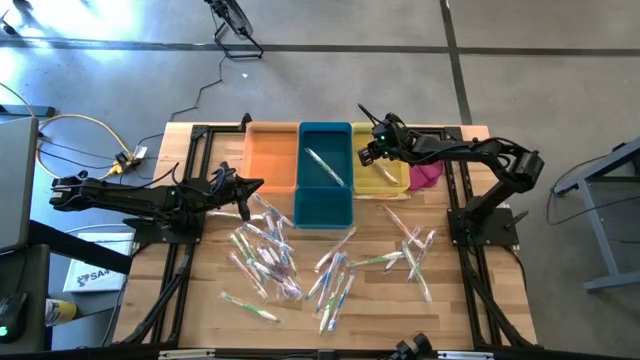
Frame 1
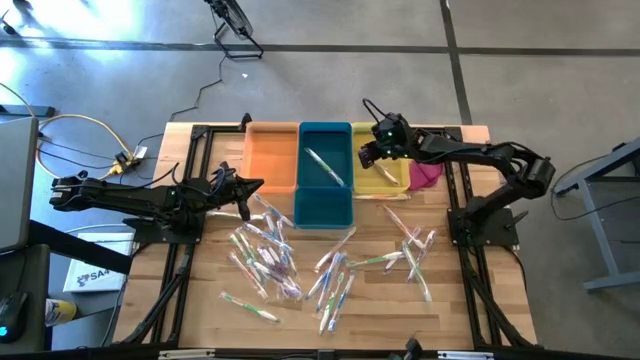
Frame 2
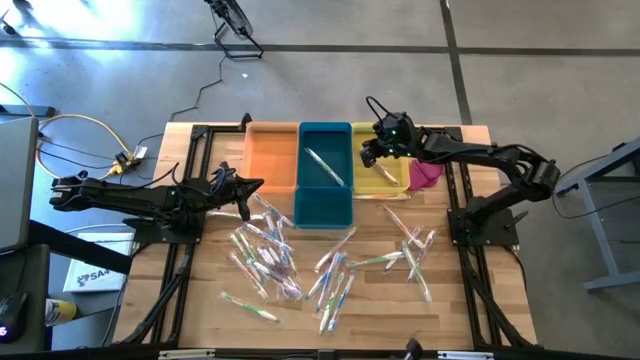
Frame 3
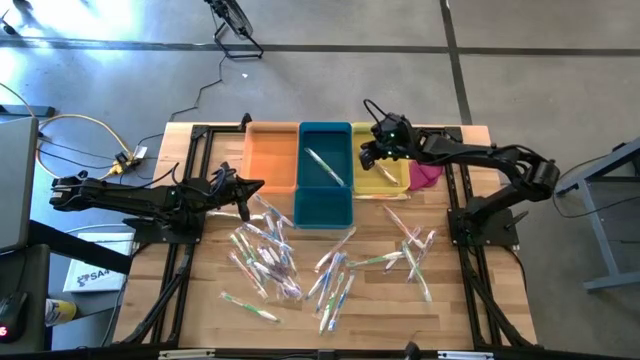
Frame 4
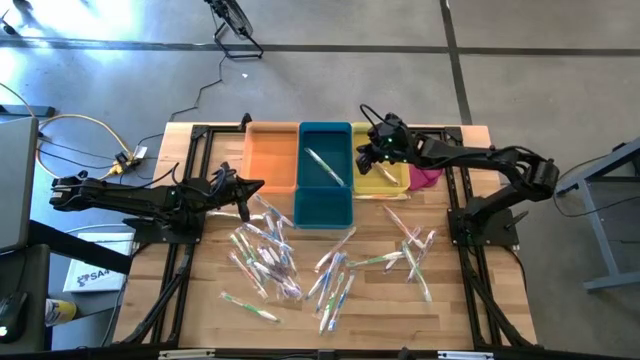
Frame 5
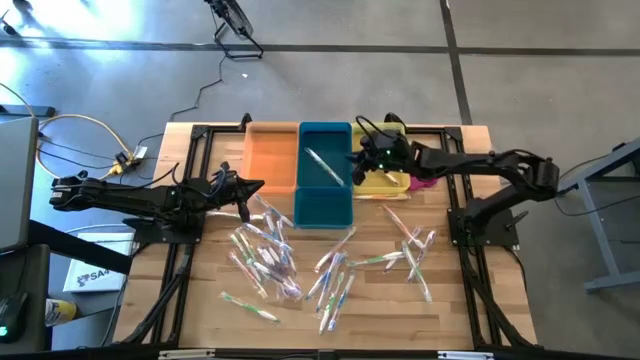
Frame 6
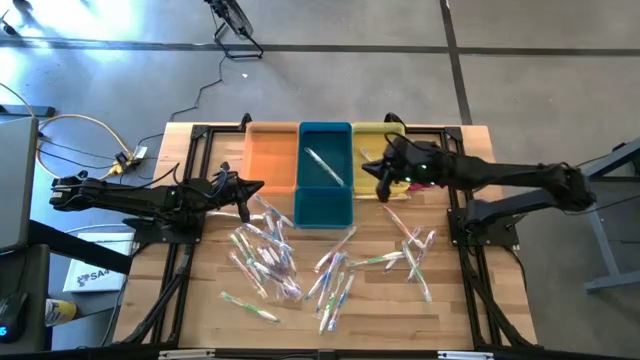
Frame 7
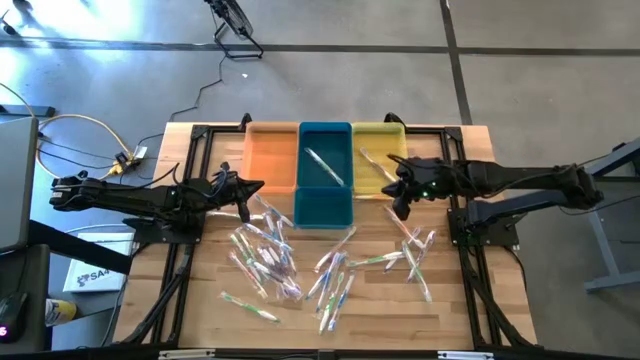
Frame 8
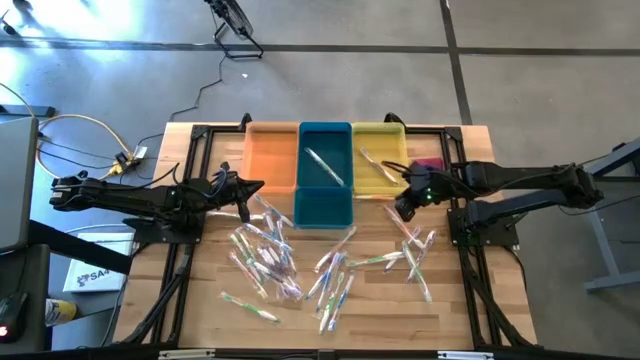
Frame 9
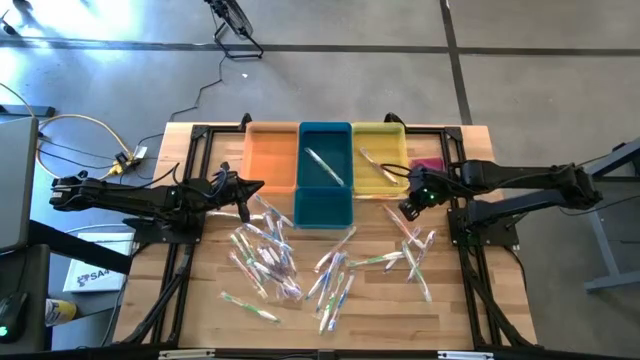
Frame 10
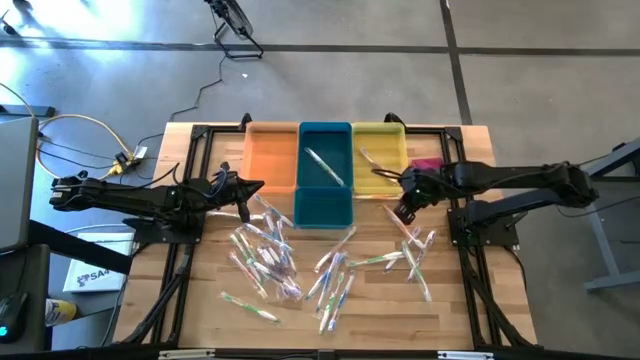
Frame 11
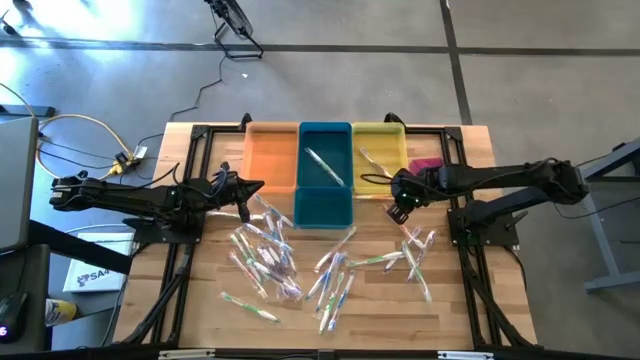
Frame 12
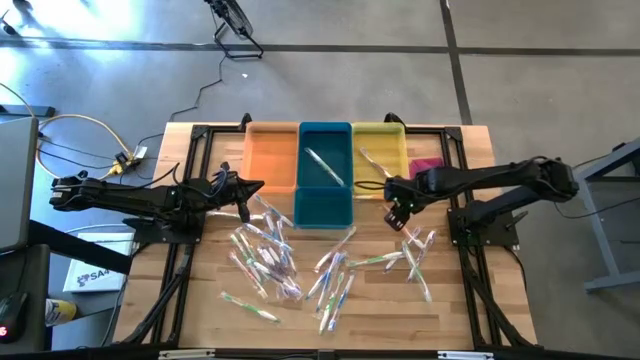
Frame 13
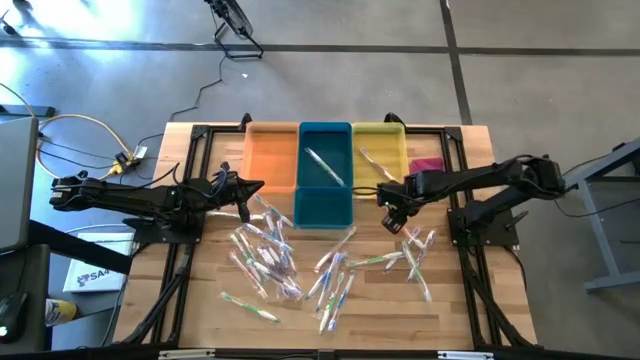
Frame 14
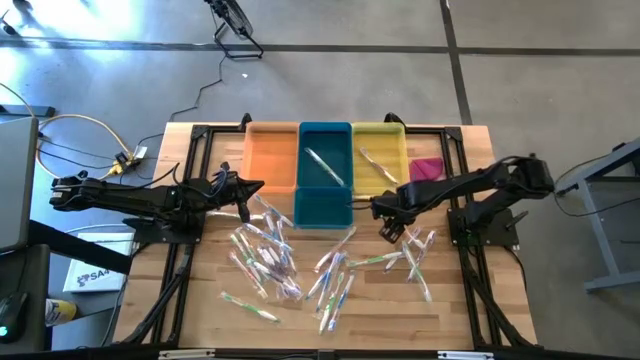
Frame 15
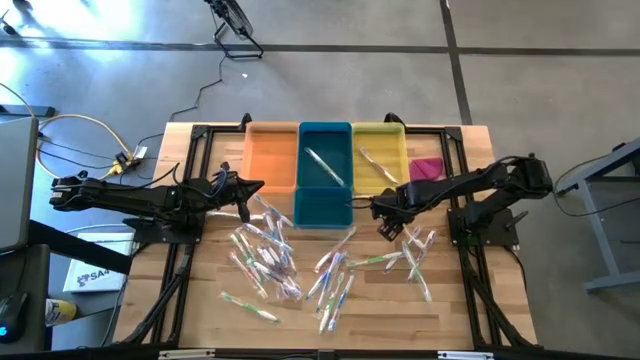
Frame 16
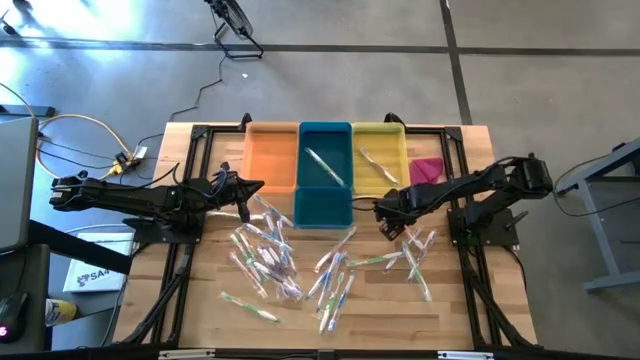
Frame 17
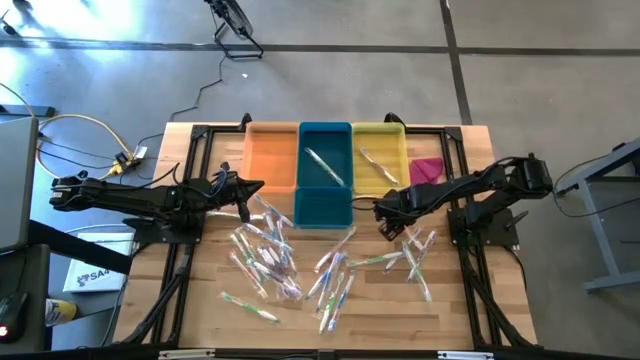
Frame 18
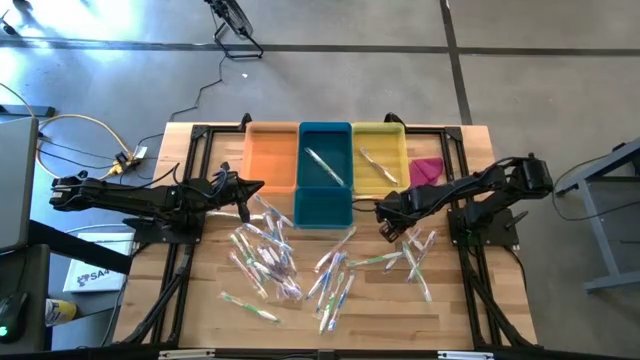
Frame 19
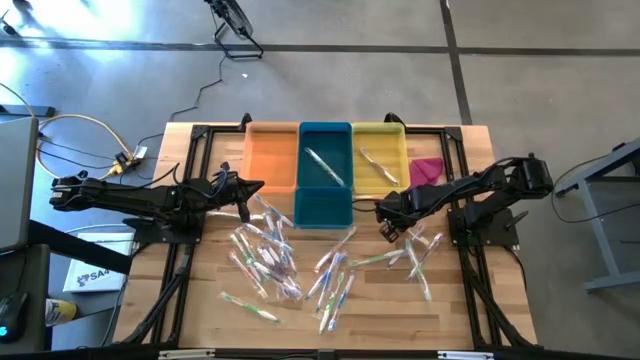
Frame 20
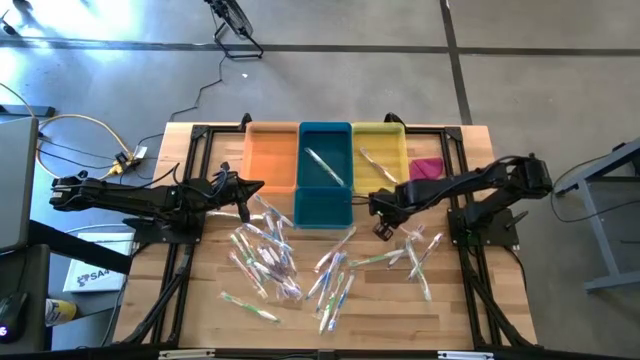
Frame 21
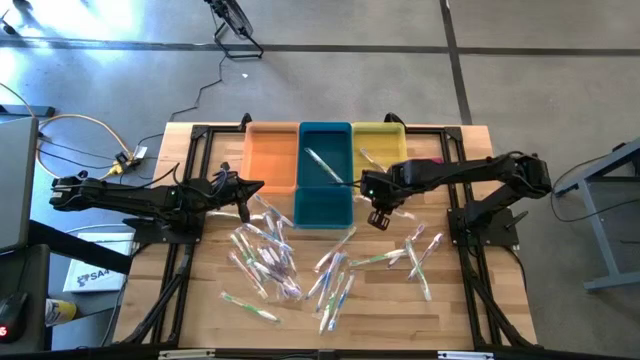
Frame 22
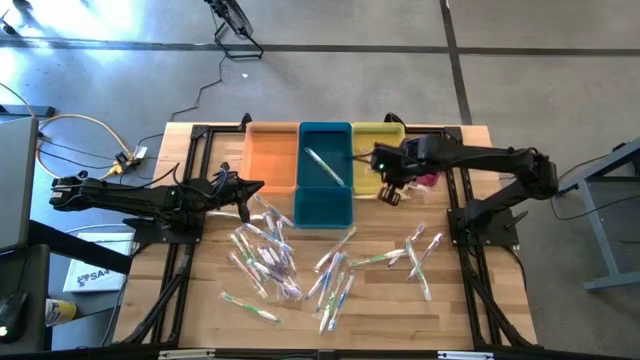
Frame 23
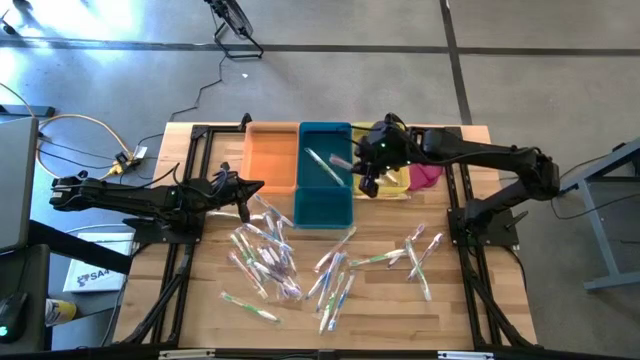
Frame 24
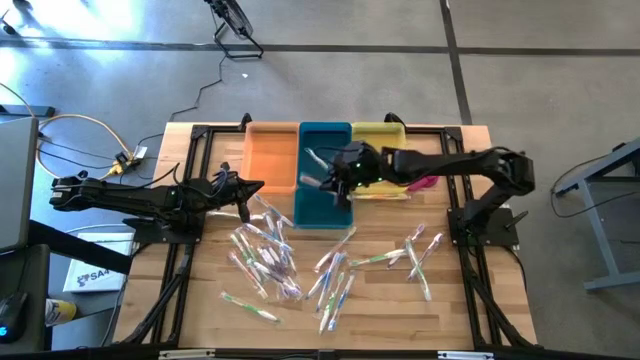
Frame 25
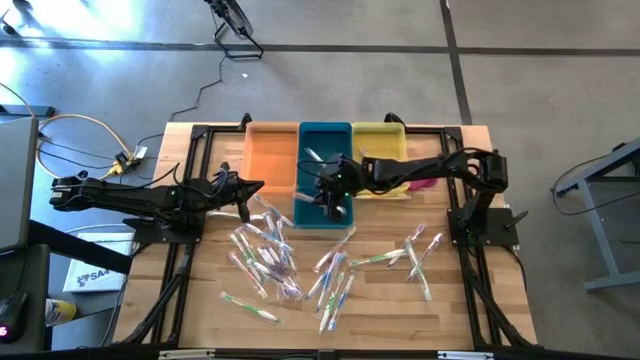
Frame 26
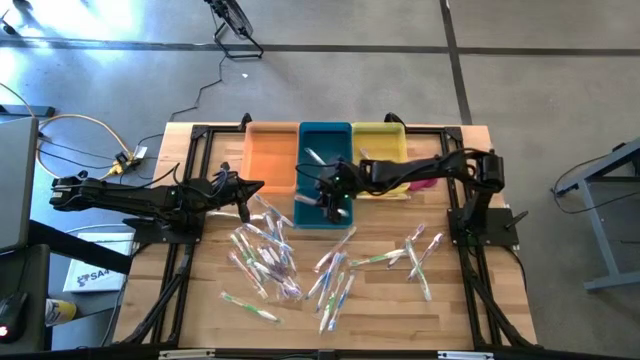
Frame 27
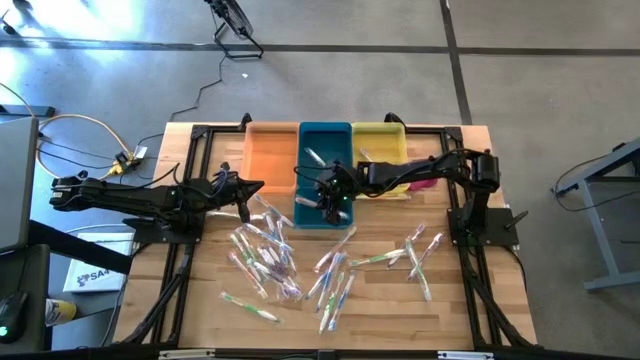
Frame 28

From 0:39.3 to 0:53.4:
Task: Pick & Place Toothbrushes
Put the orange toothbrush into the bottom blue bin

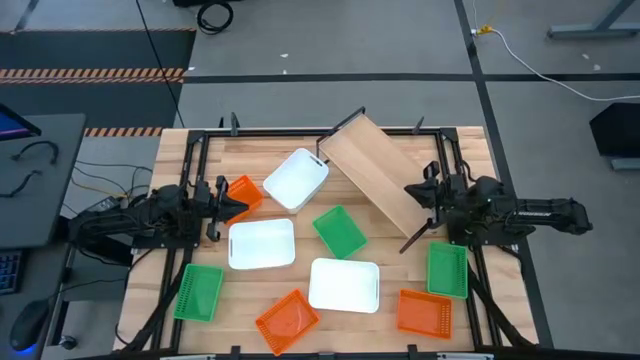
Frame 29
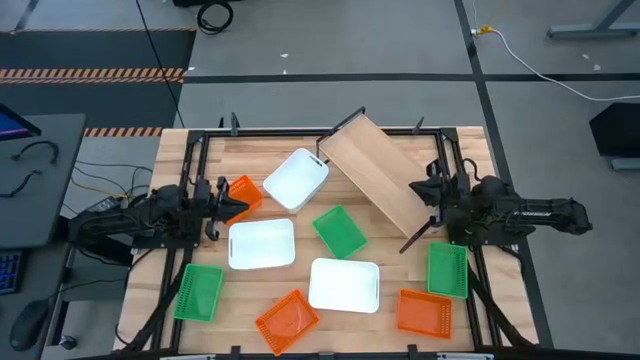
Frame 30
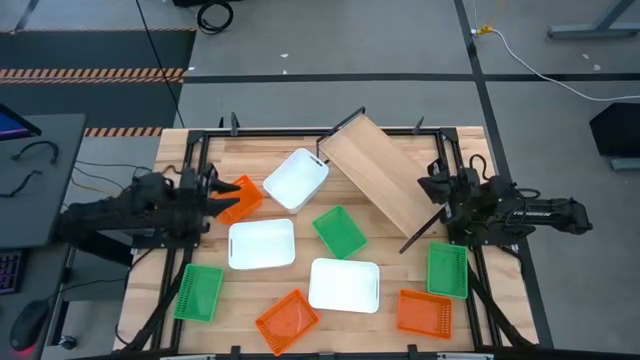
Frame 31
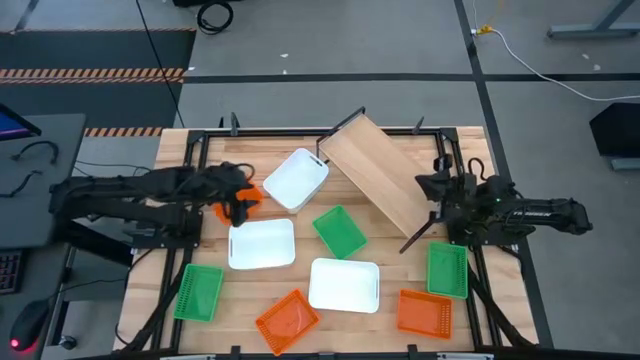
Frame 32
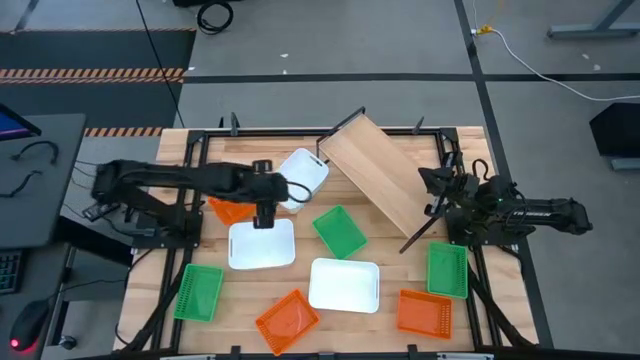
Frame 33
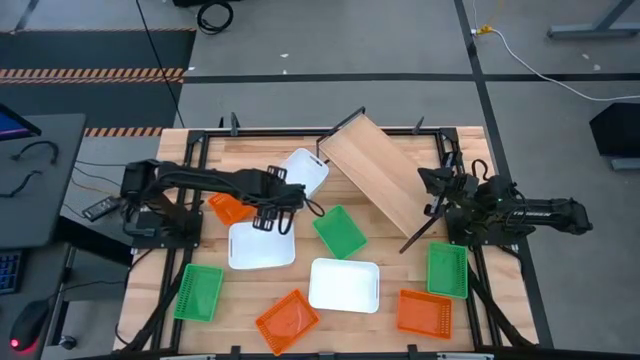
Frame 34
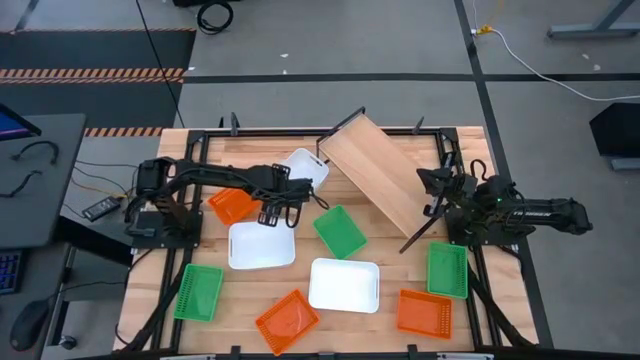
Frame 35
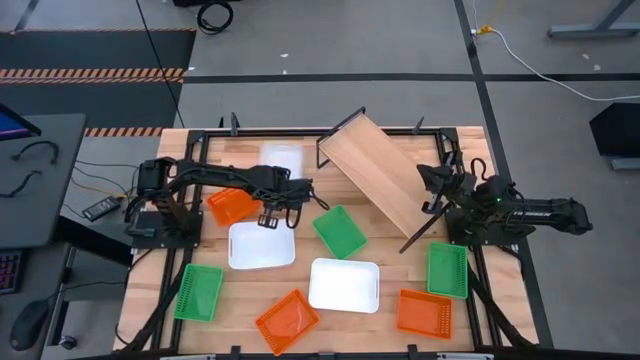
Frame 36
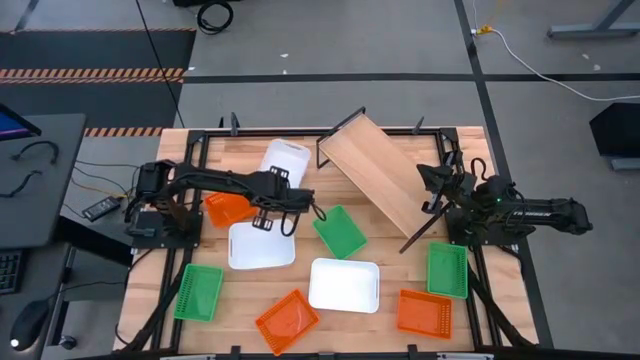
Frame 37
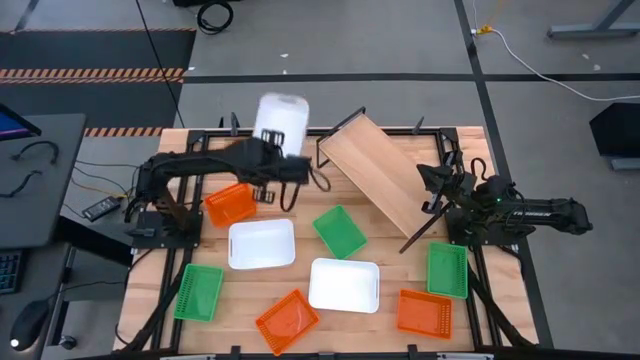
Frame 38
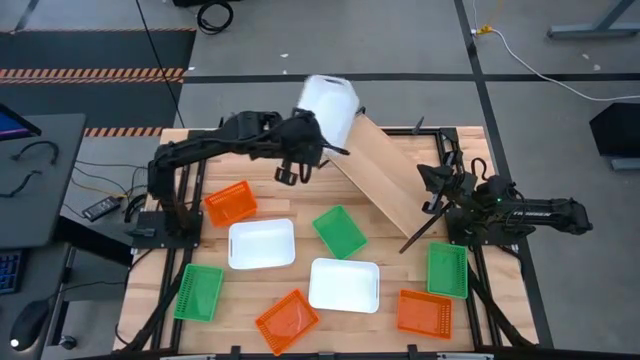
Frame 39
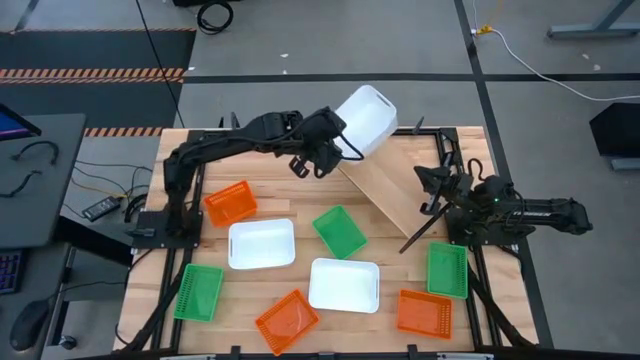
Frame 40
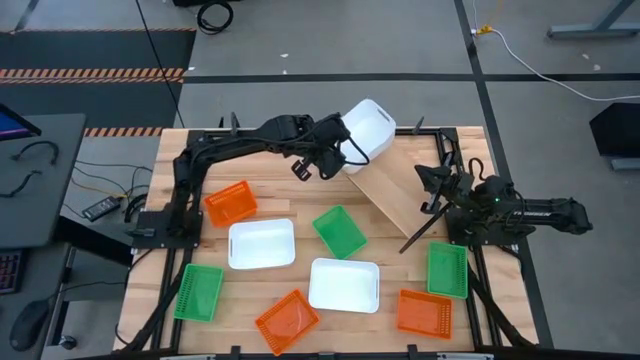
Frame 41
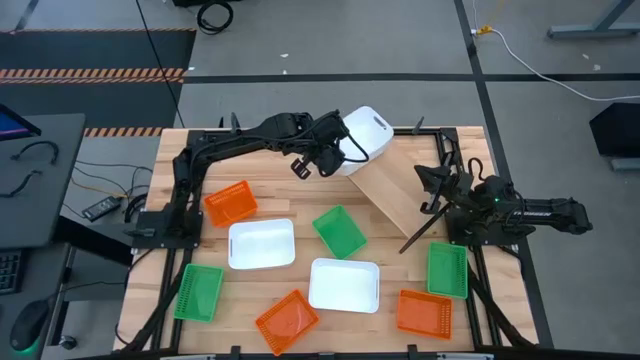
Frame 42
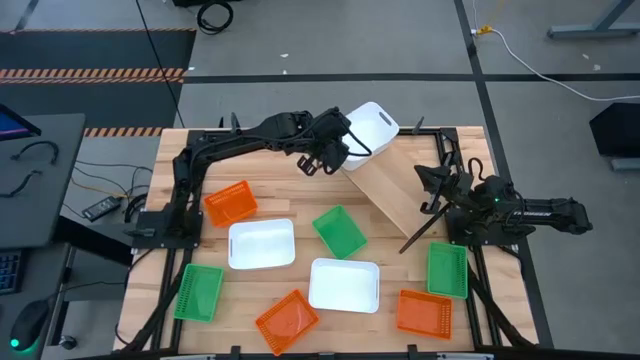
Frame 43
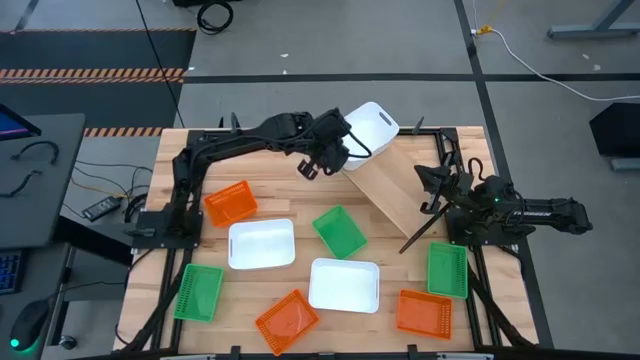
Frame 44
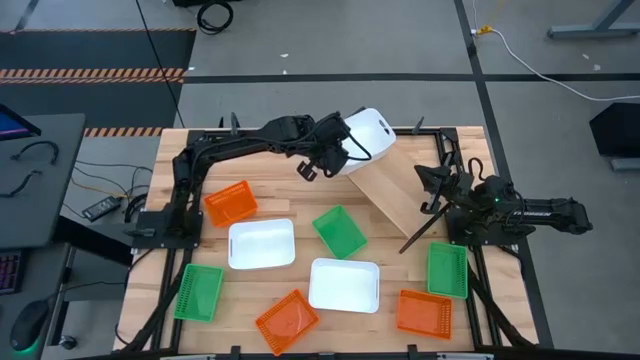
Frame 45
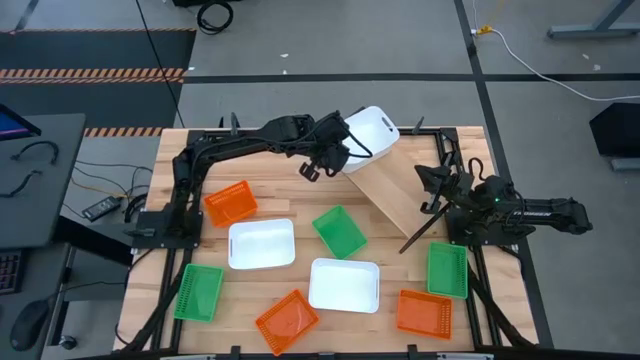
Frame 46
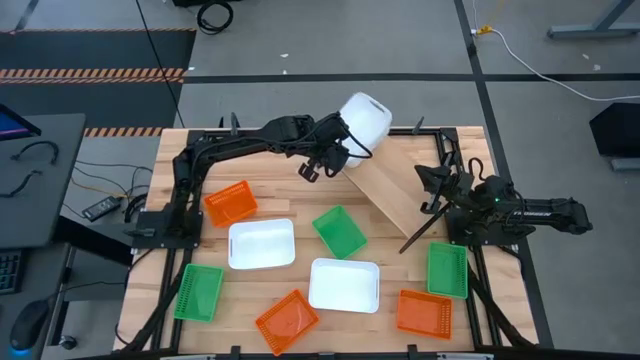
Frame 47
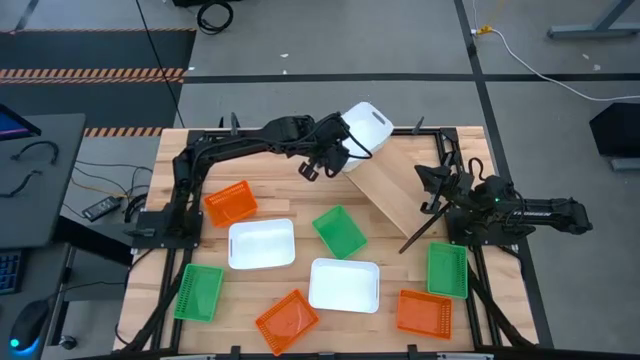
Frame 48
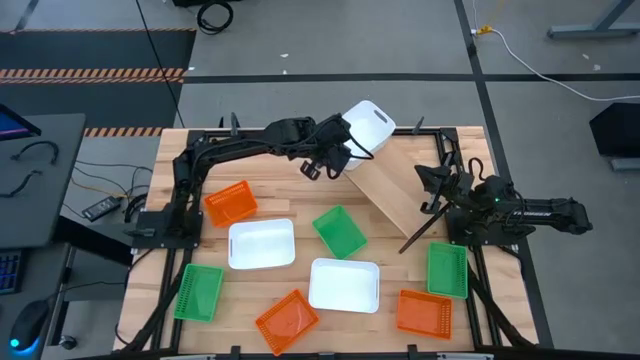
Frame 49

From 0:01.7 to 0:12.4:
Task: Stack baskets on shelf by color
Put the top white bin on the shelf
